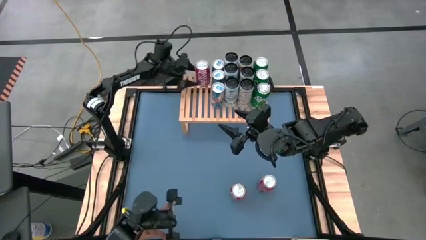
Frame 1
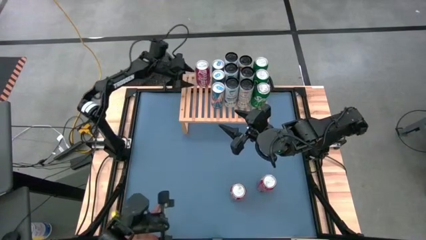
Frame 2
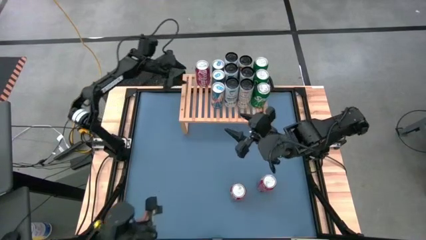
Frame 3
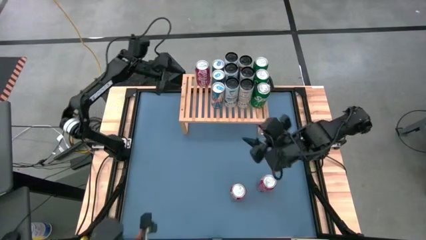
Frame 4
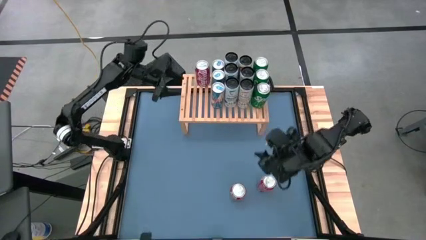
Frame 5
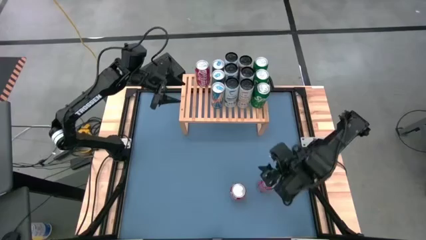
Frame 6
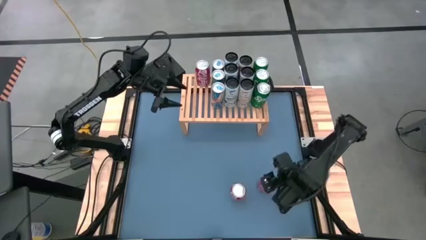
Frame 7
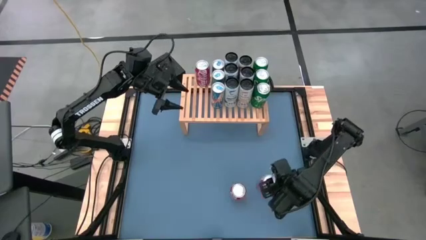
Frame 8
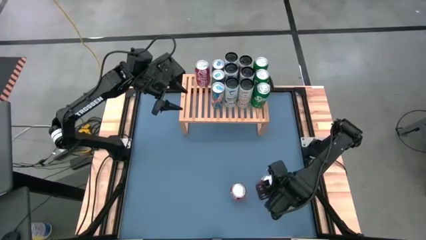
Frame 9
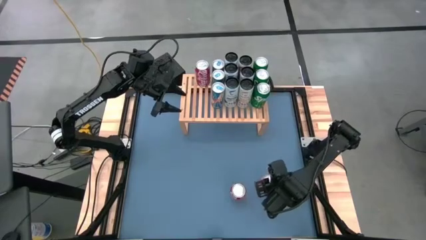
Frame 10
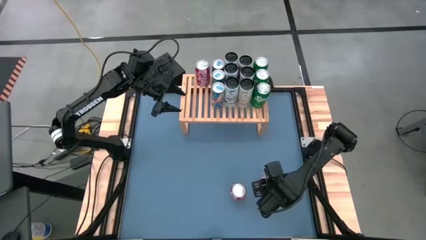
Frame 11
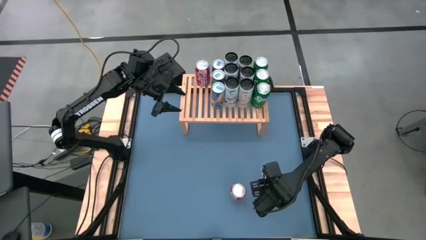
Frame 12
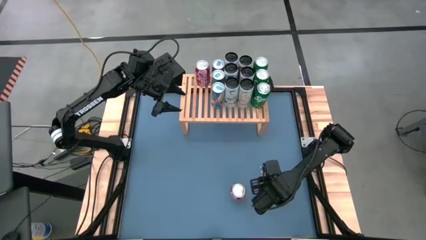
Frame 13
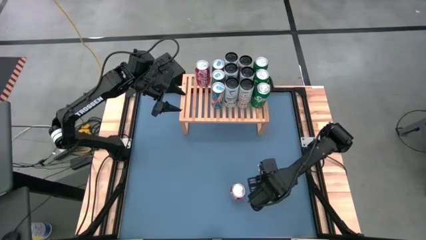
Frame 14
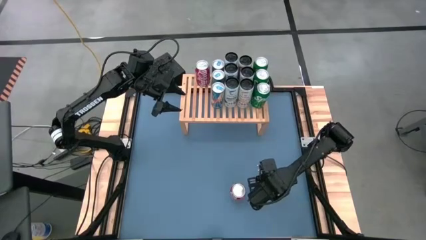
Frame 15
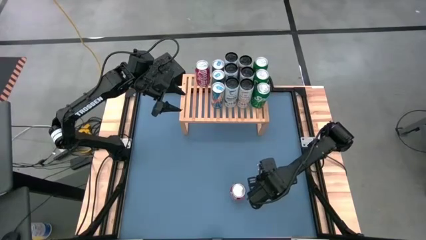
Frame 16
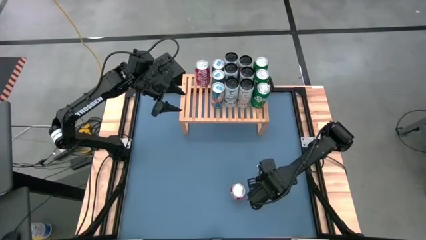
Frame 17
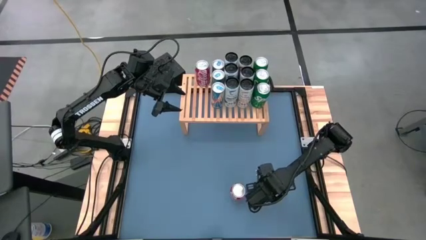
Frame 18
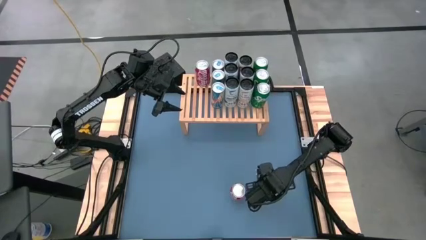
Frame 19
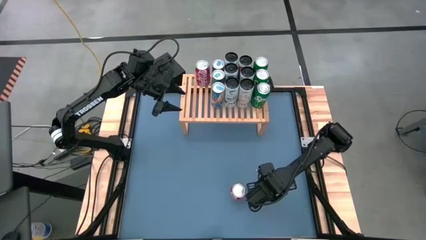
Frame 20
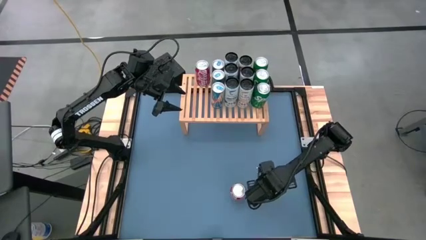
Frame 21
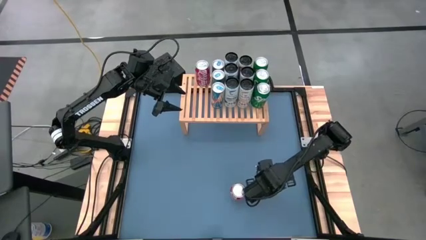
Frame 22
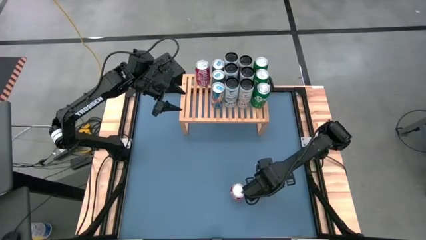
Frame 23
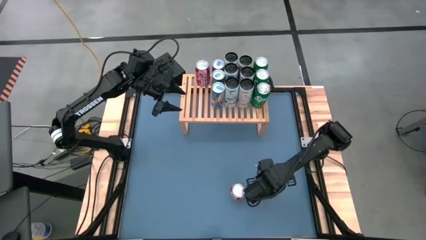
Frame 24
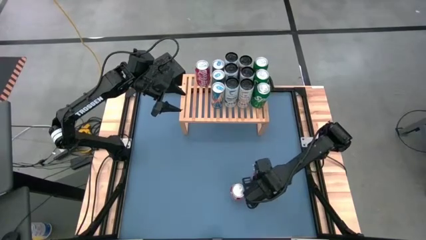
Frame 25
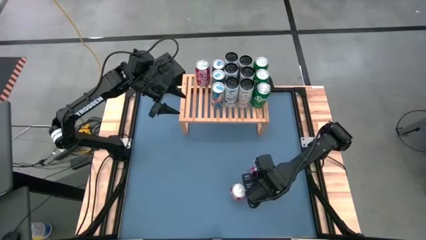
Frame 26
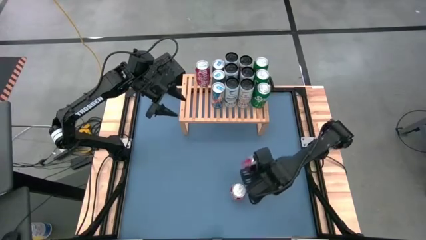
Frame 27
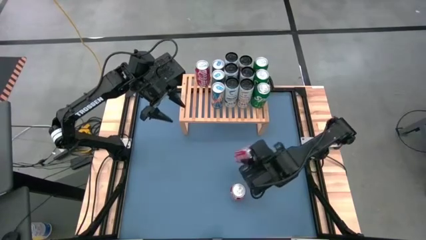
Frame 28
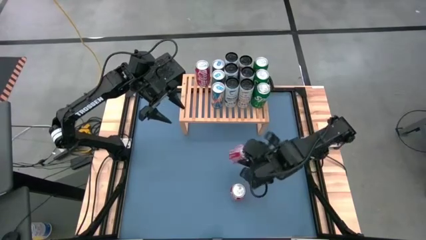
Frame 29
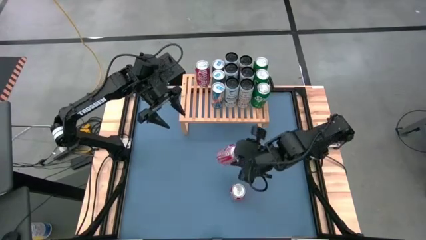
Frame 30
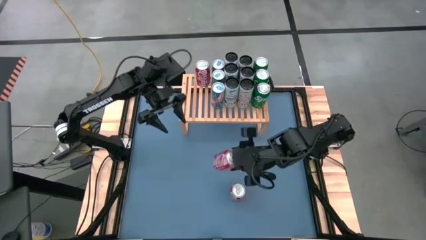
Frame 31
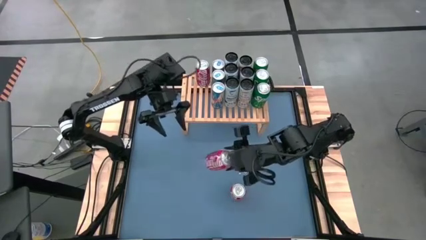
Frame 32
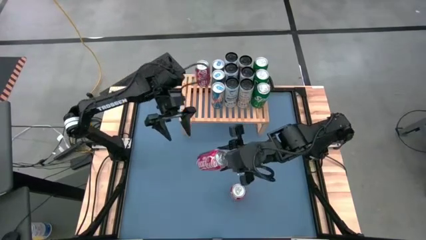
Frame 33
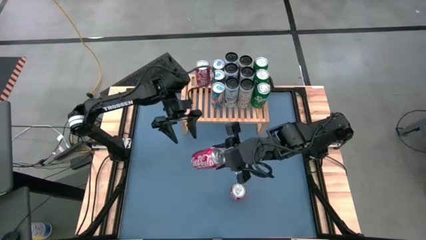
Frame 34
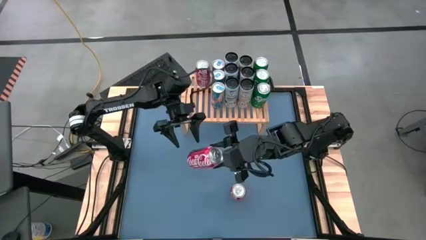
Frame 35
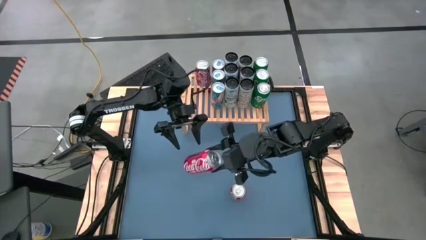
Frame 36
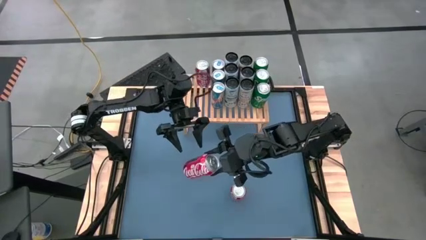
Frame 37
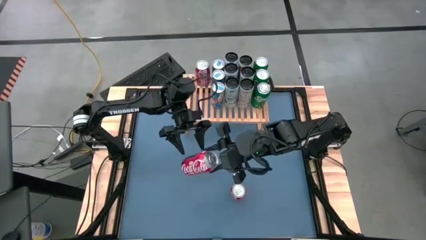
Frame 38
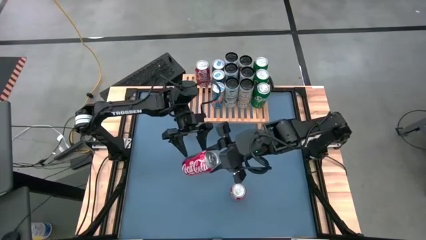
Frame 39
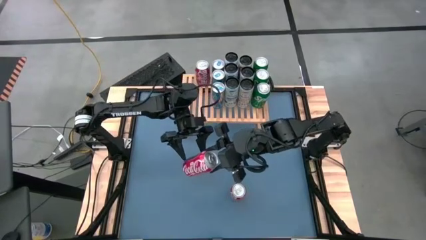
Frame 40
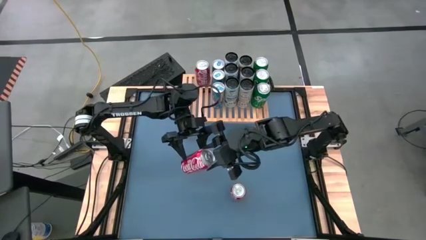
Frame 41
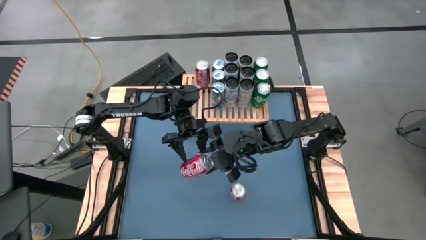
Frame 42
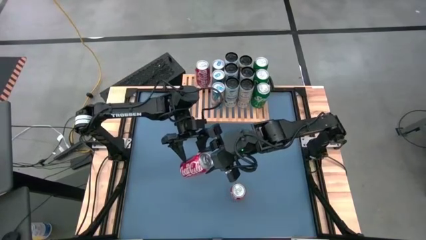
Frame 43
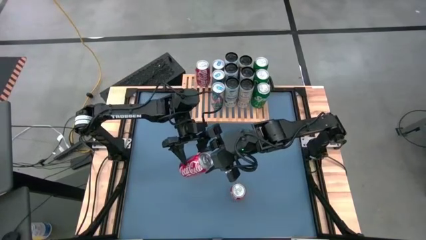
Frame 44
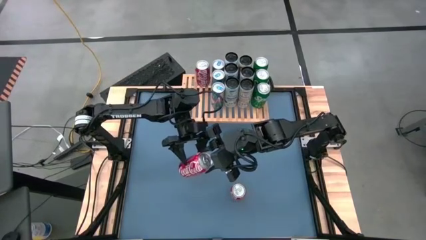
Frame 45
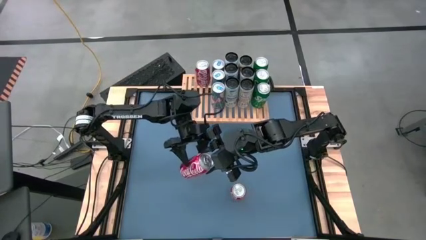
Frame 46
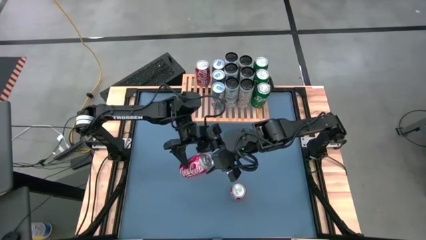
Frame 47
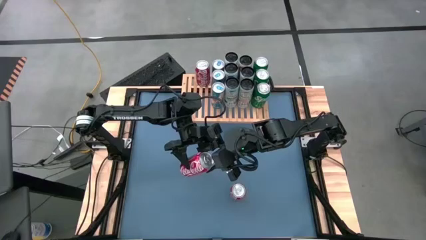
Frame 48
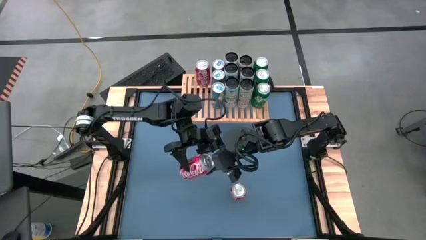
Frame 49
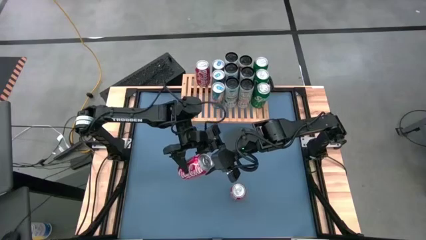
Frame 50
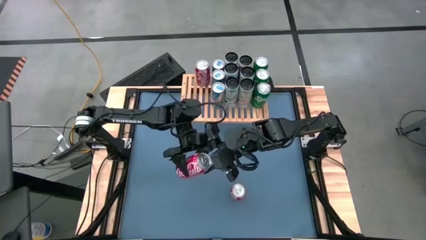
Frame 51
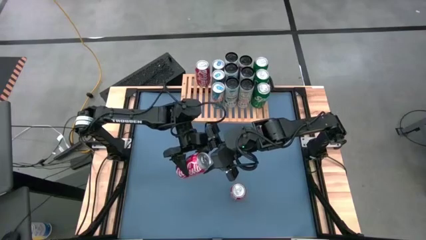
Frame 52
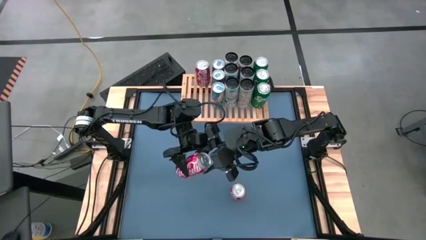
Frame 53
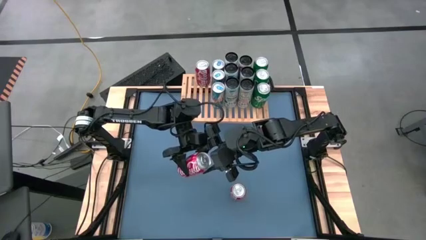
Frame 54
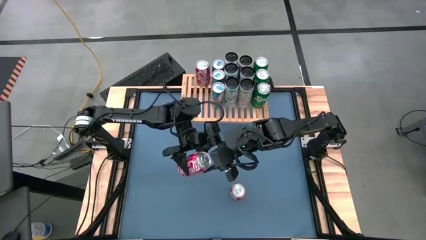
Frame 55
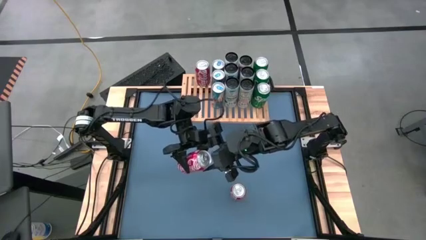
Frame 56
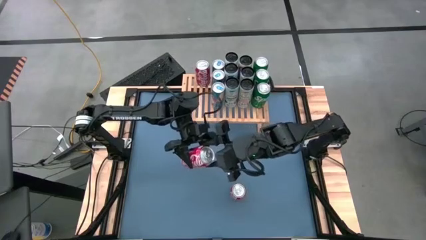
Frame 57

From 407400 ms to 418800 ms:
Task: Place canned beverage on shelf
Put the right red soda can on the shelf aligned with the other red soda can
